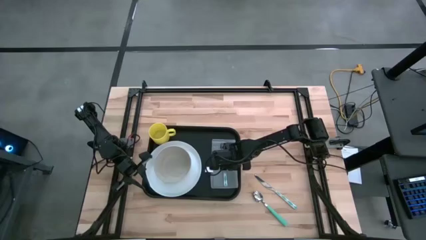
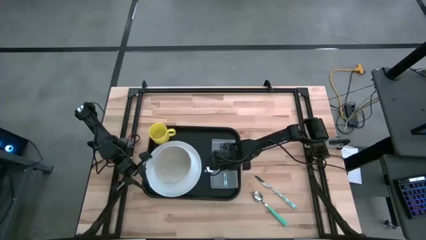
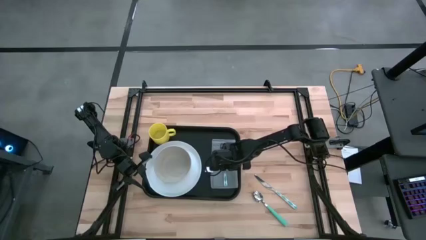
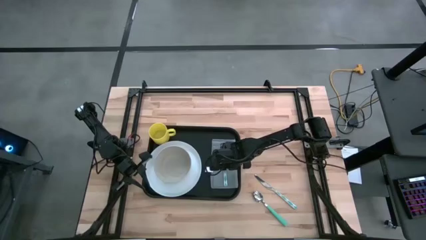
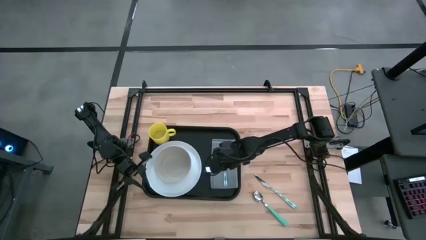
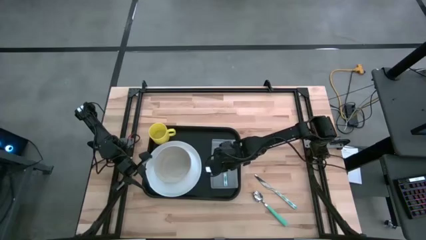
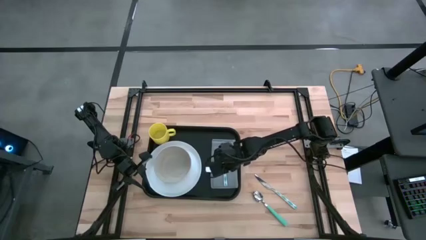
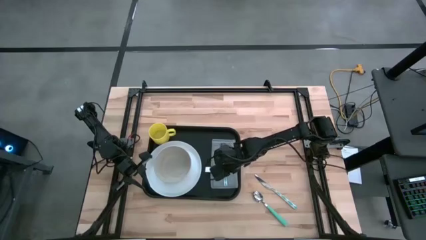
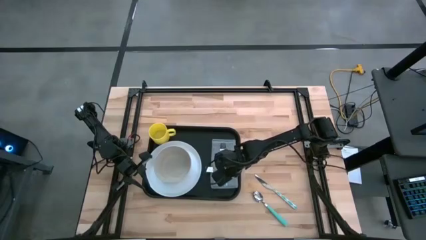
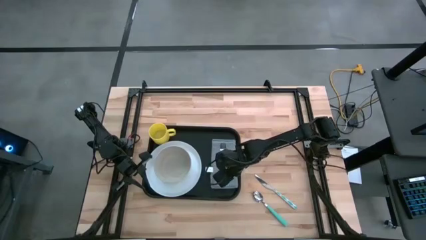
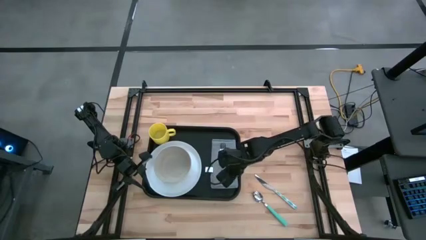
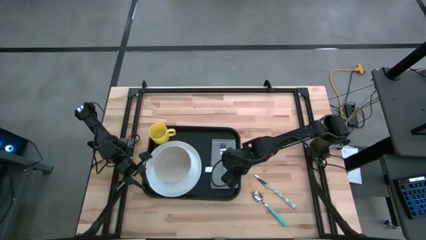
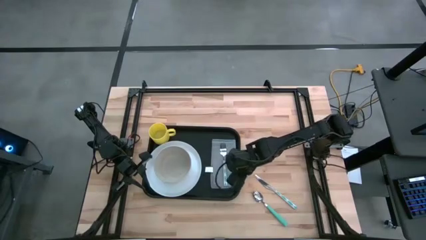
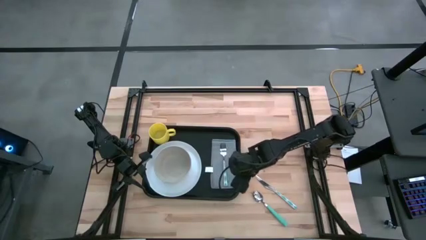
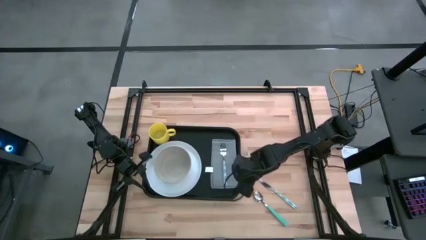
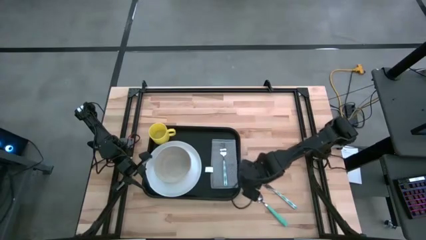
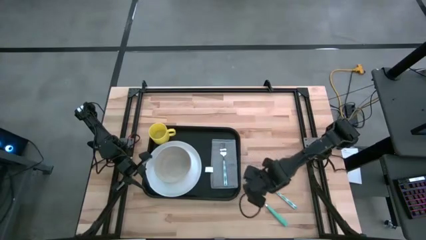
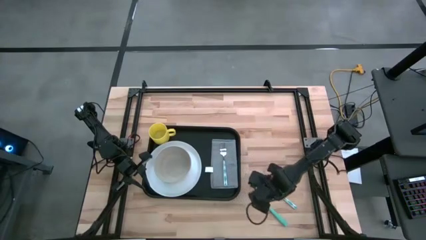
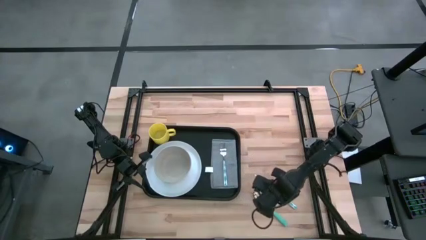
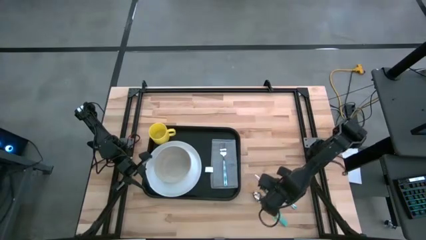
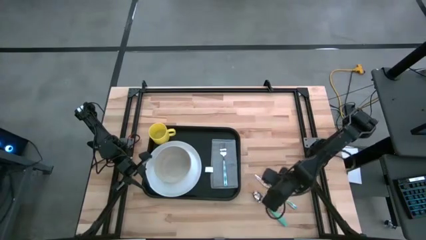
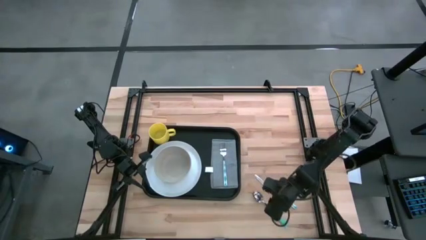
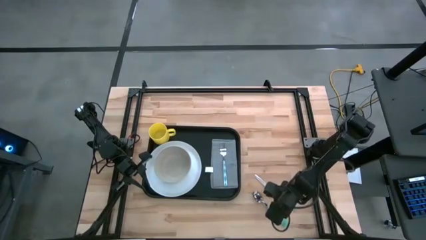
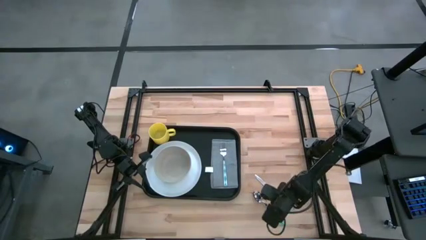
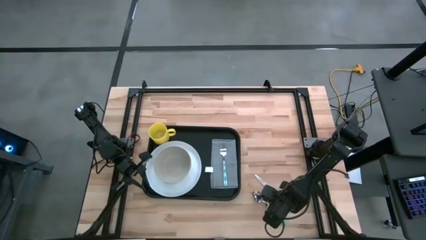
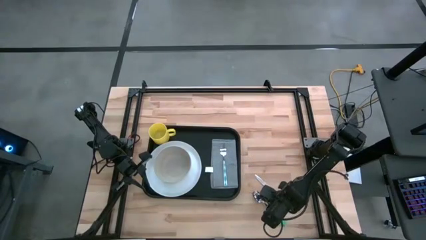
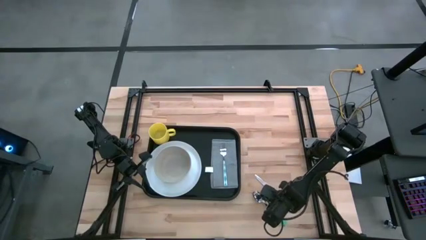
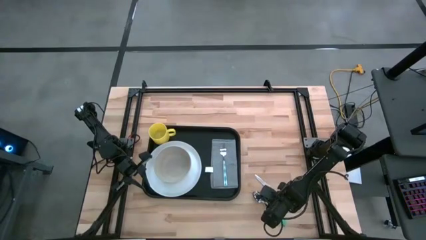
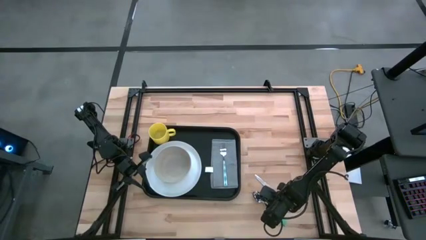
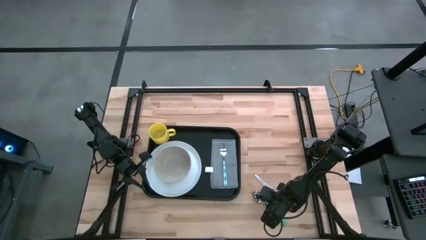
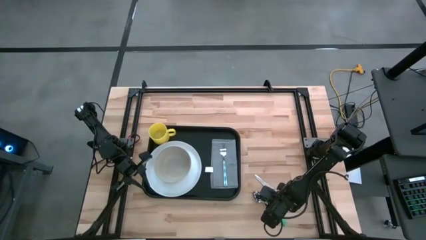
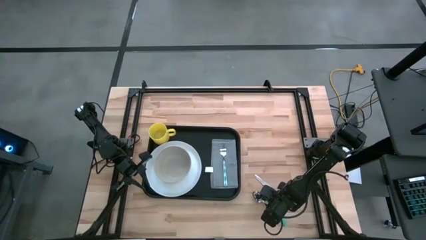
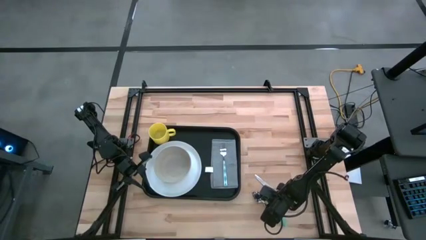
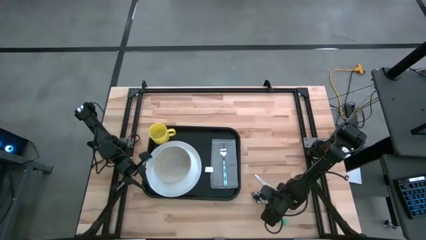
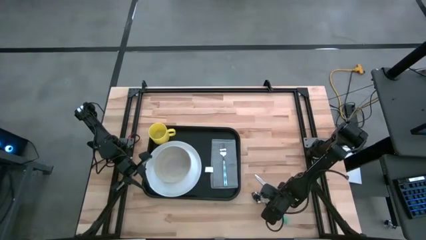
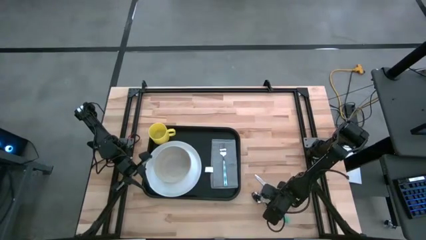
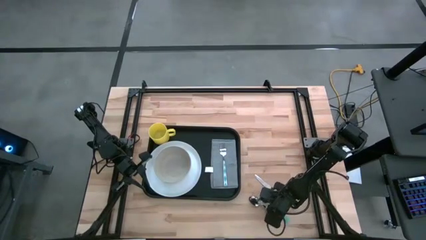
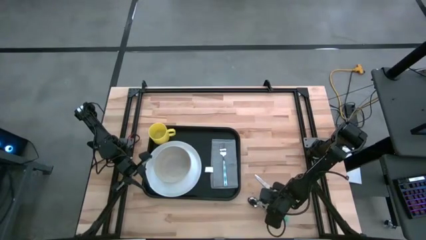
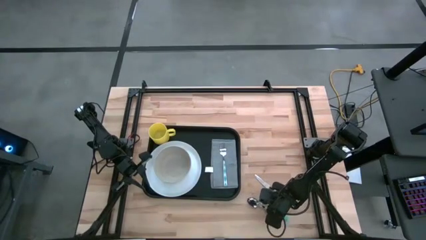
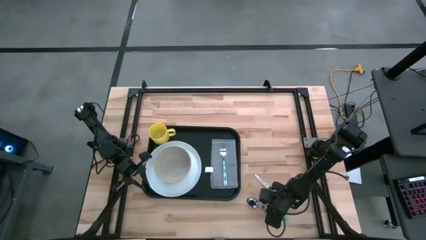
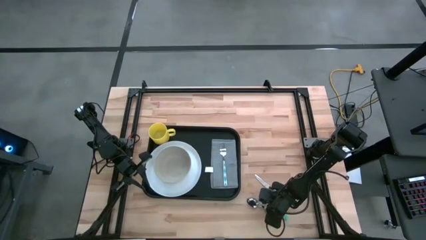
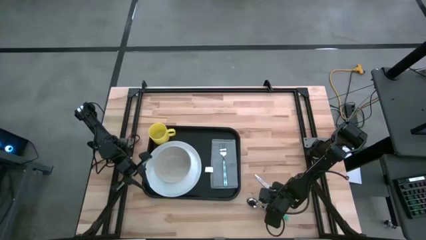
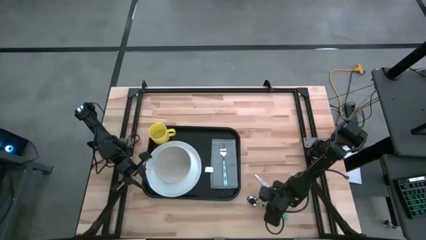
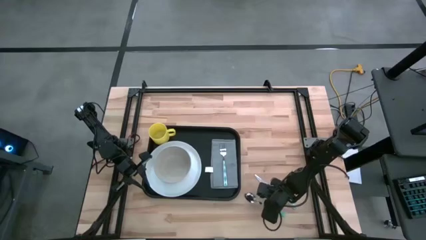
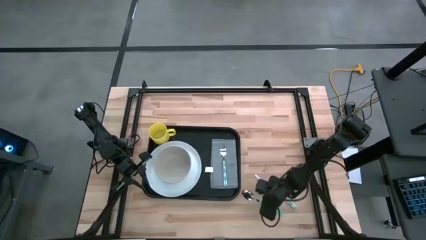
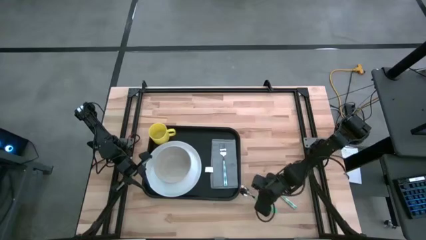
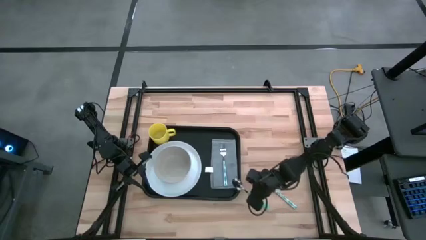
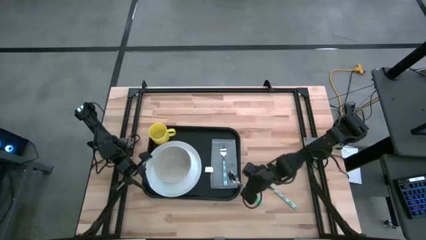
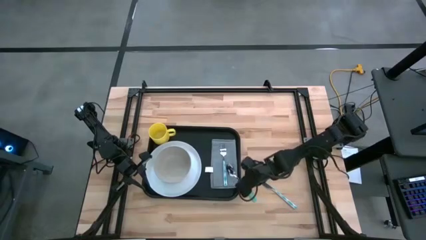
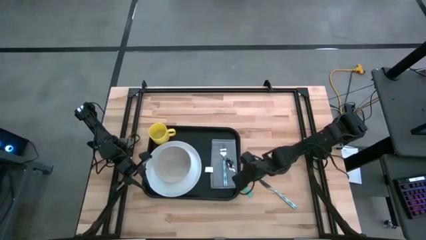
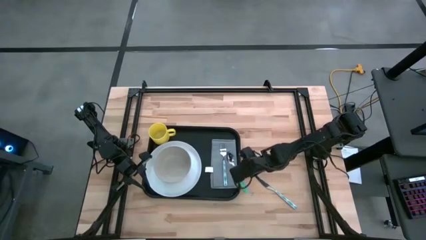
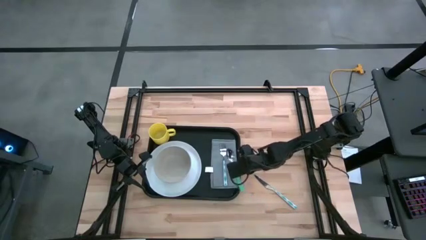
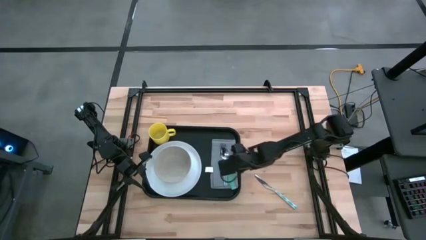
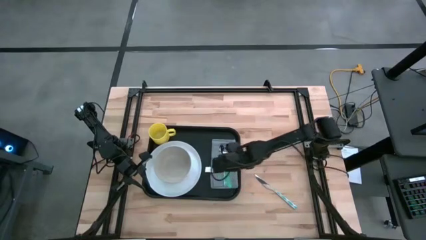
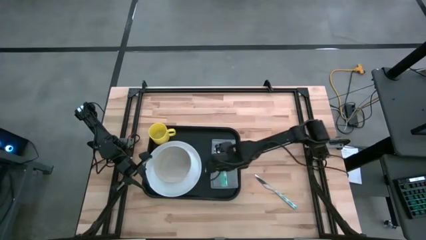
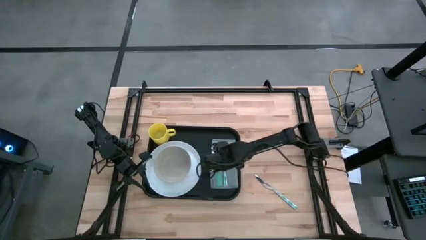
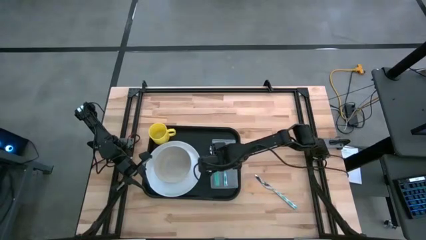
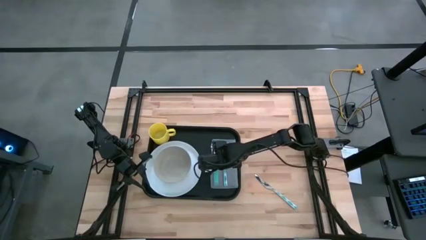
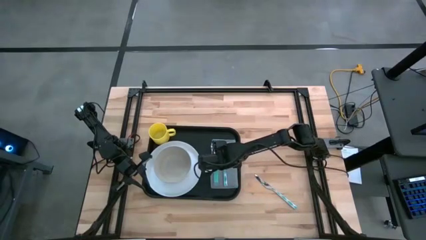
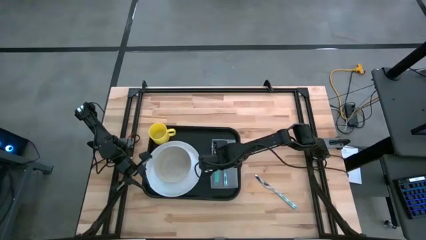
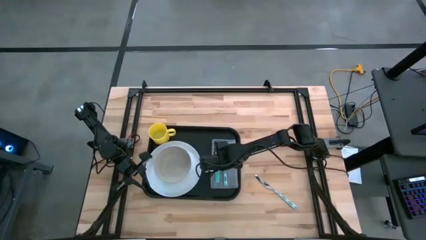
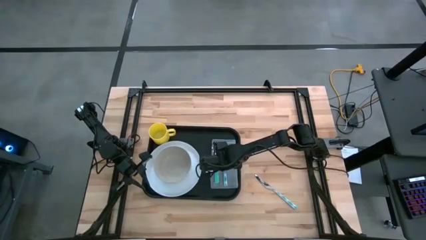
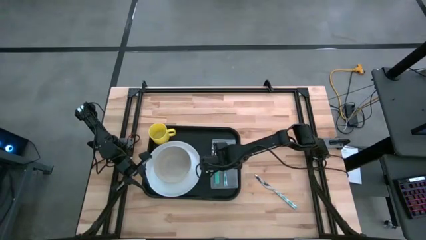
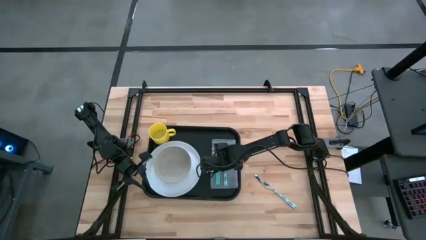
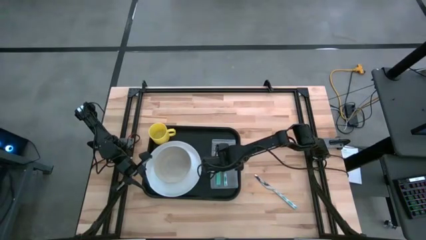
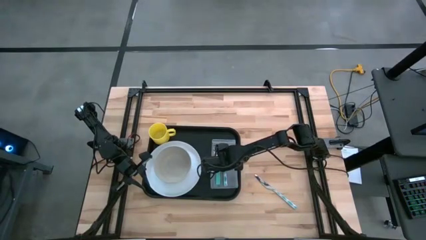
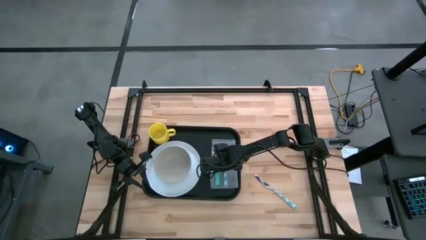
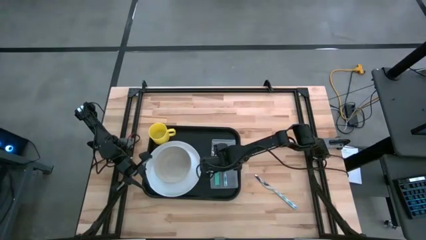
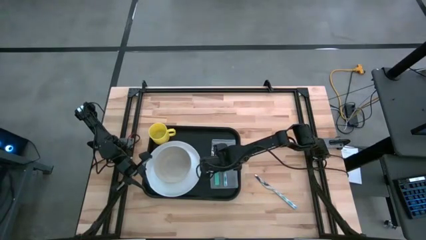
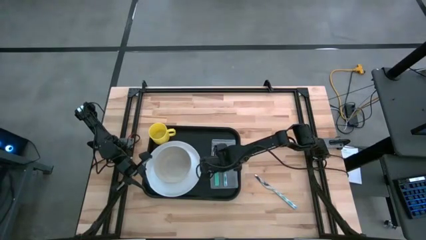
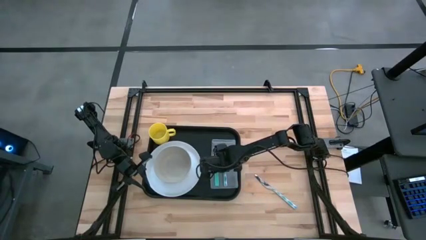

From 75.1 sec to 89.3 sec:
Task: Set up tray
Put the blue spoon on the gray napkin to the right of the white plate

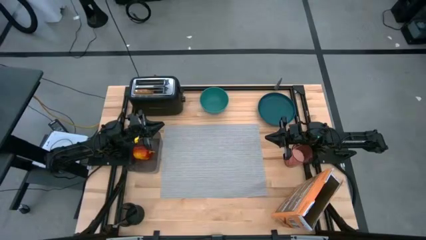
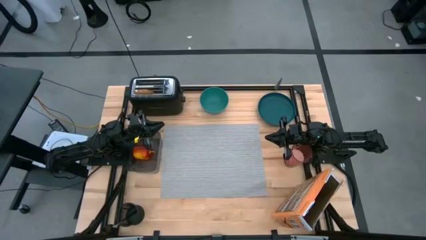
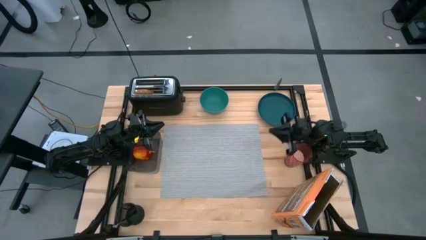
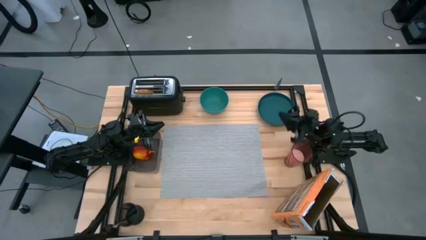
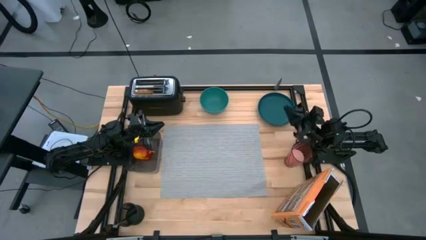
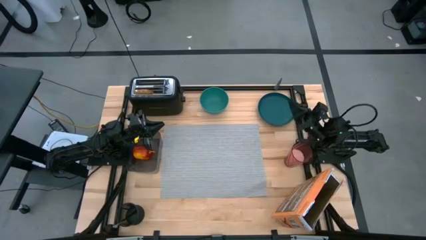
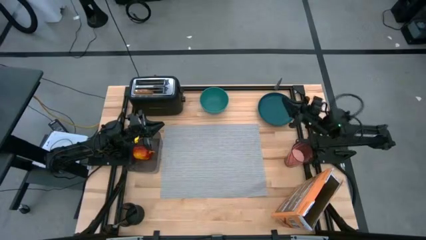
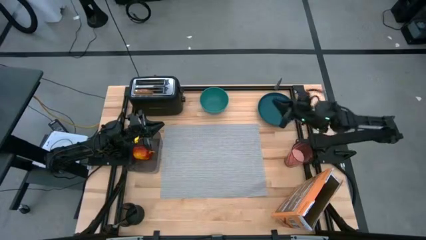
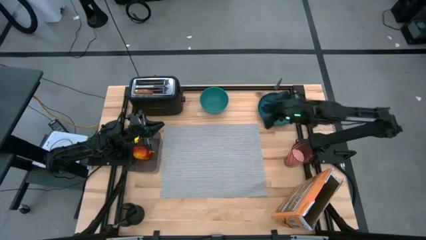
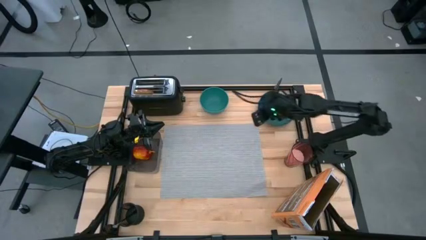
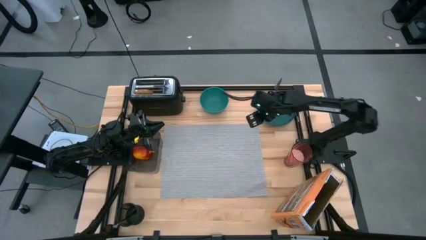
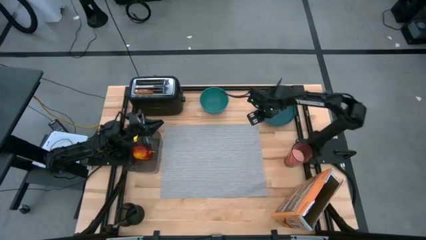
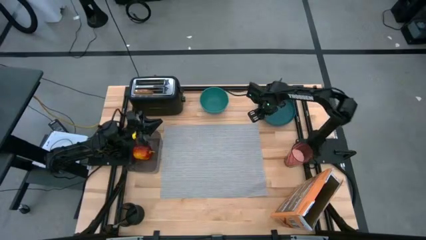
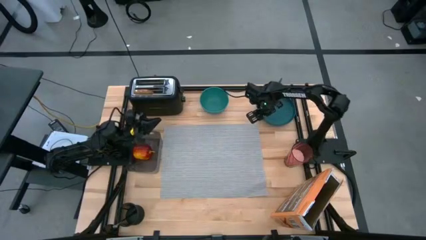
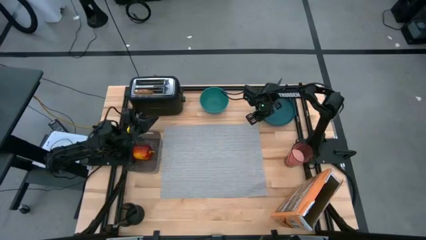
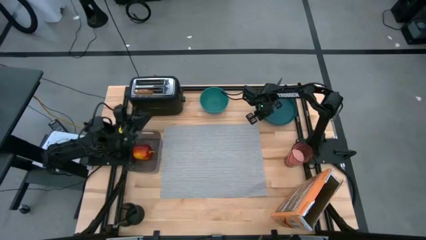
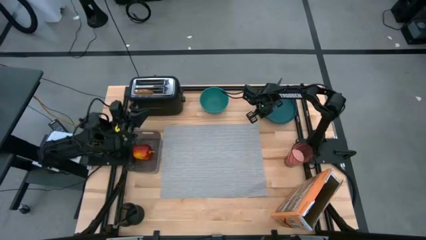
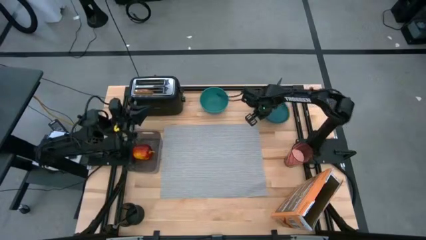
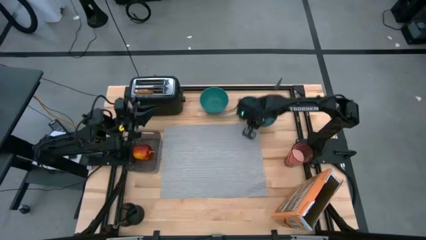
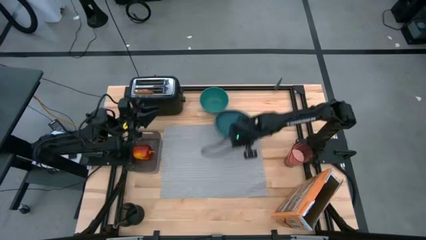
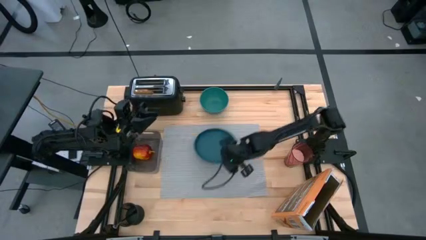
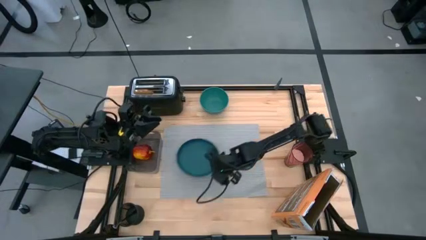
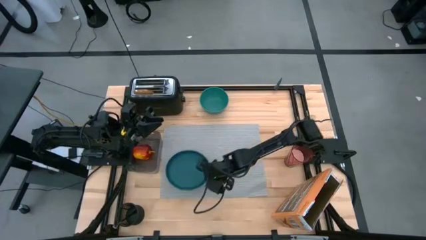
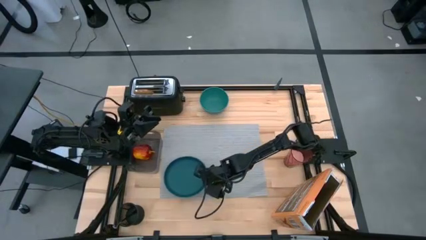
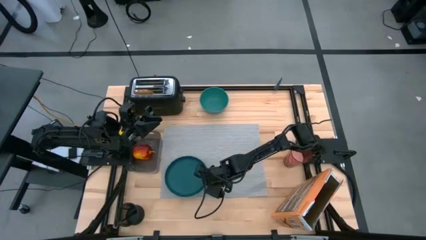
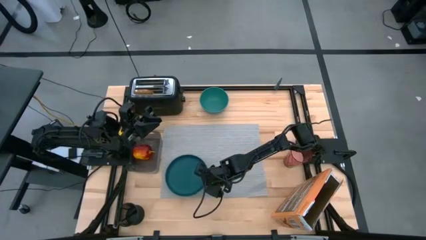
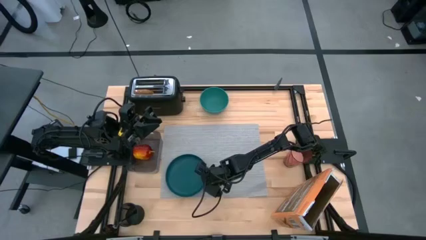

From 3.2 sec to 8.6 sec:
Task: Arrange a breakfast setting
Put the blue plate on the mat
